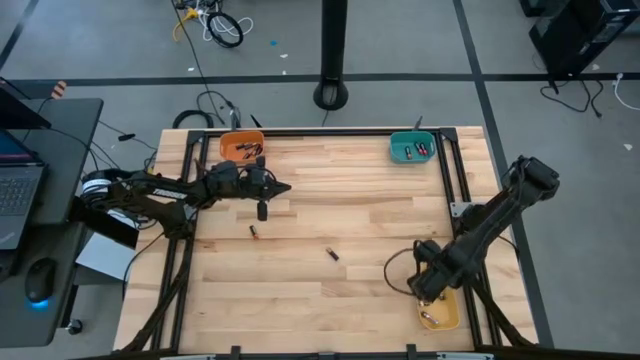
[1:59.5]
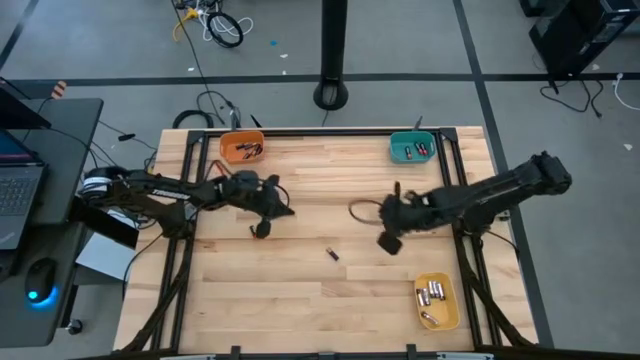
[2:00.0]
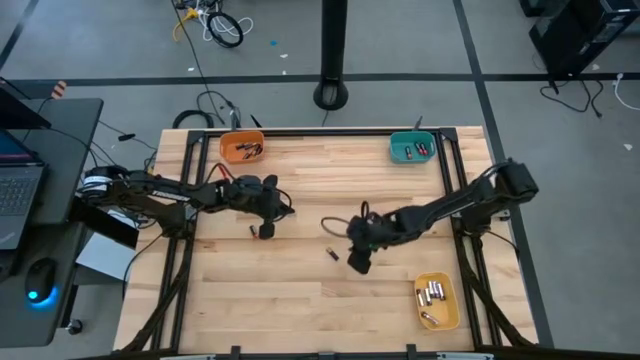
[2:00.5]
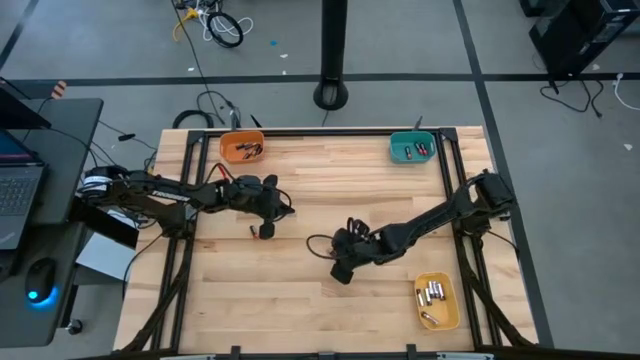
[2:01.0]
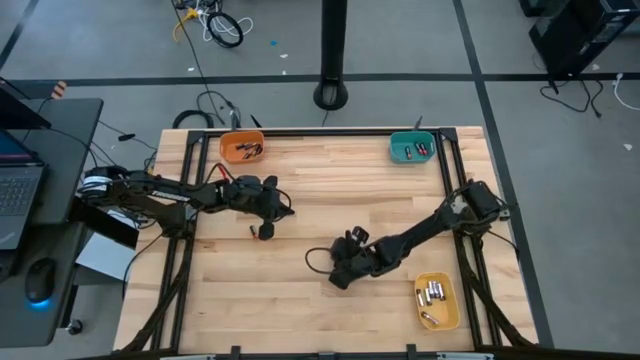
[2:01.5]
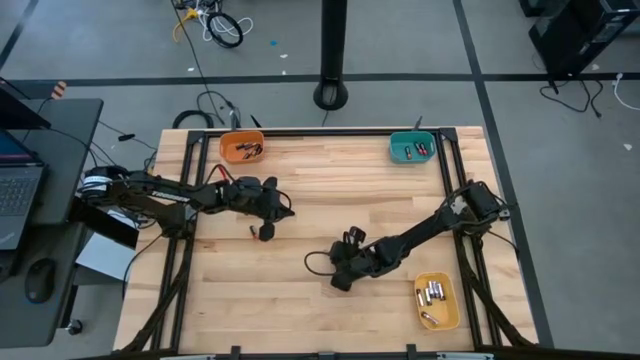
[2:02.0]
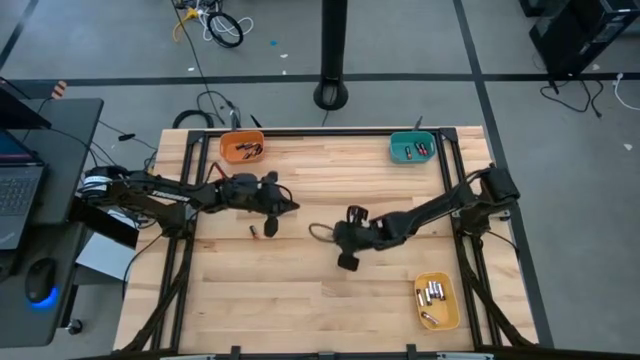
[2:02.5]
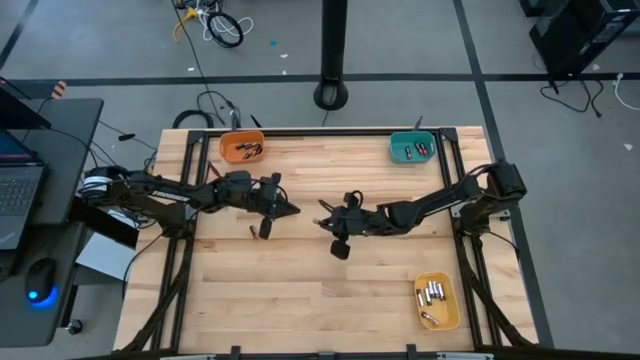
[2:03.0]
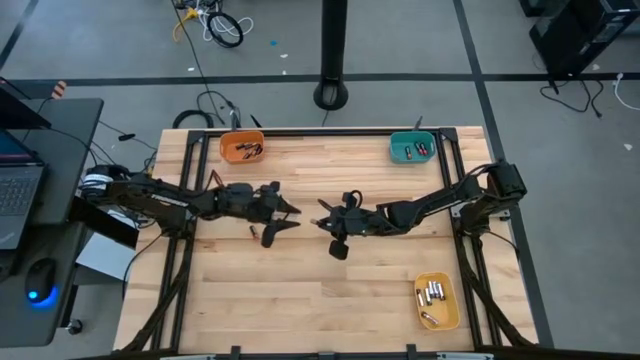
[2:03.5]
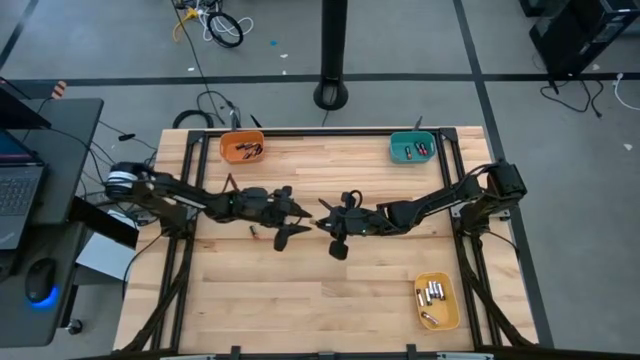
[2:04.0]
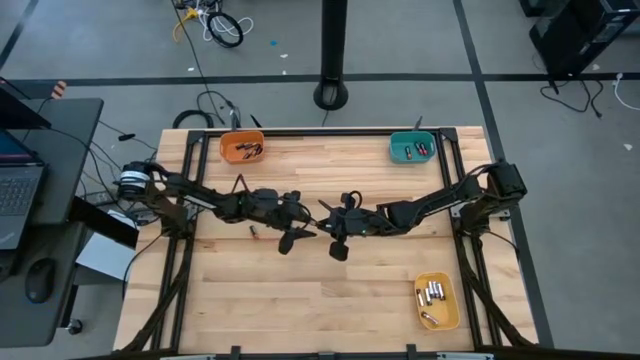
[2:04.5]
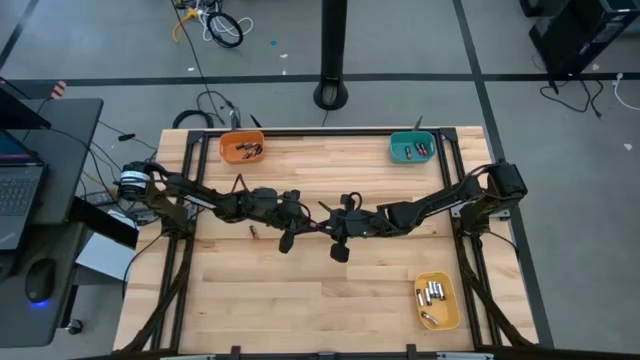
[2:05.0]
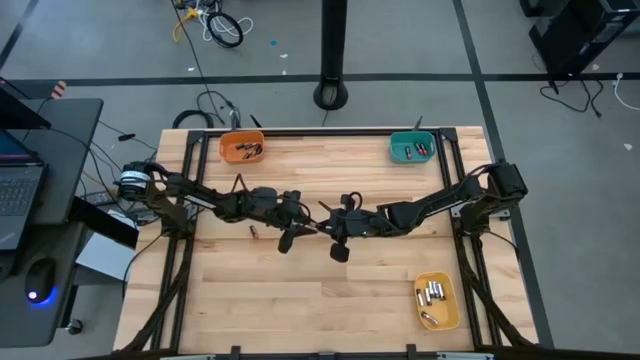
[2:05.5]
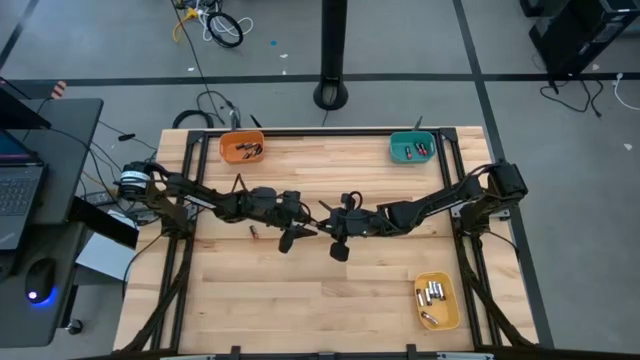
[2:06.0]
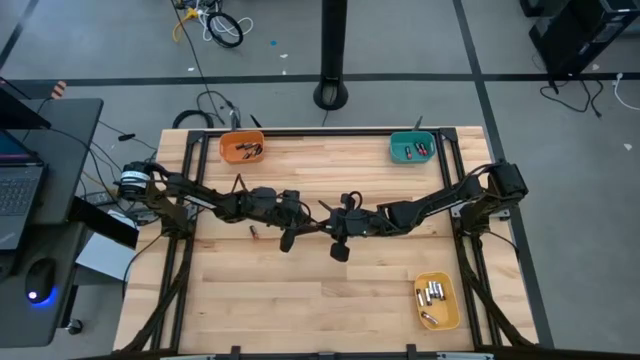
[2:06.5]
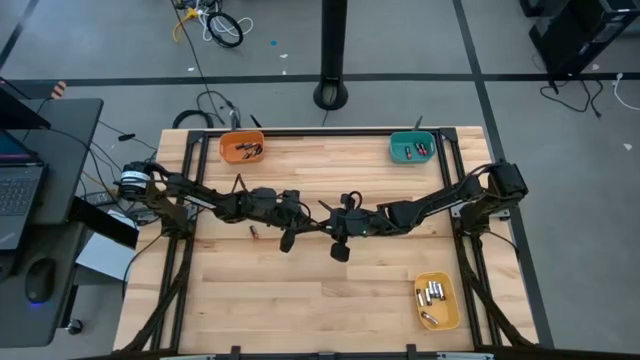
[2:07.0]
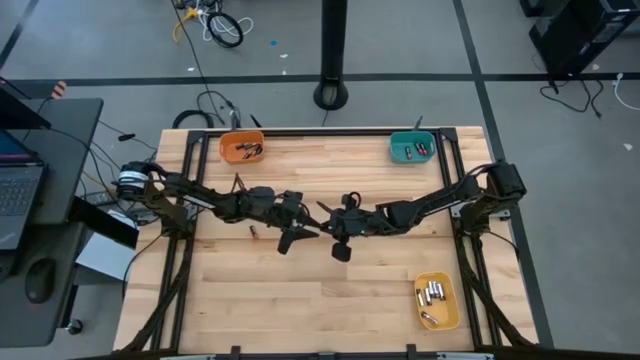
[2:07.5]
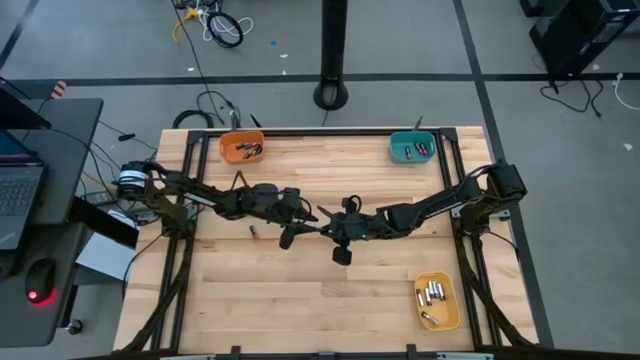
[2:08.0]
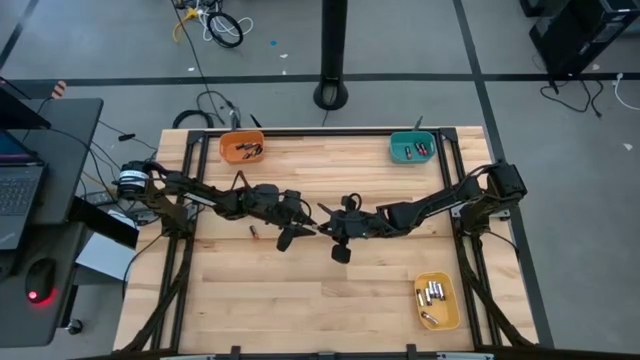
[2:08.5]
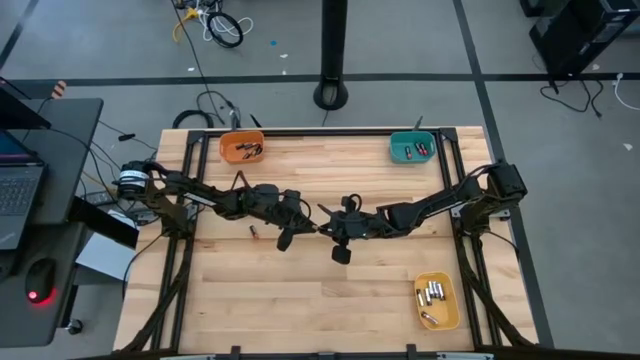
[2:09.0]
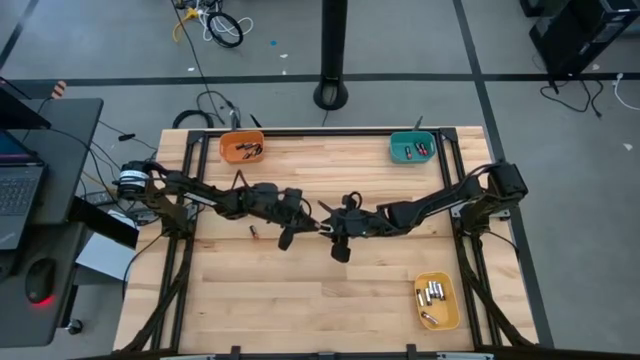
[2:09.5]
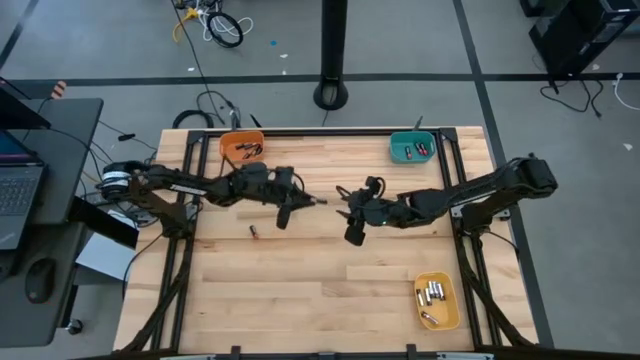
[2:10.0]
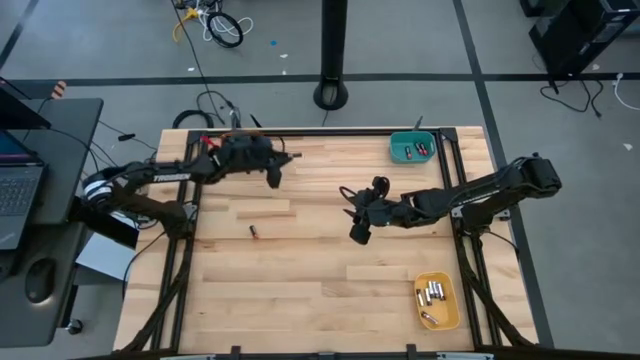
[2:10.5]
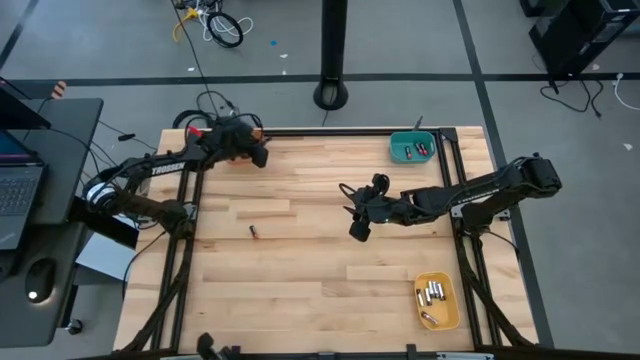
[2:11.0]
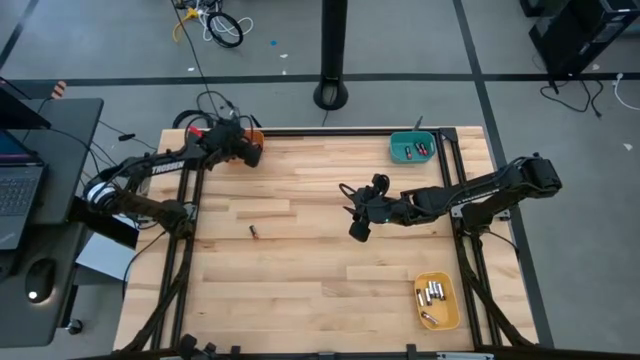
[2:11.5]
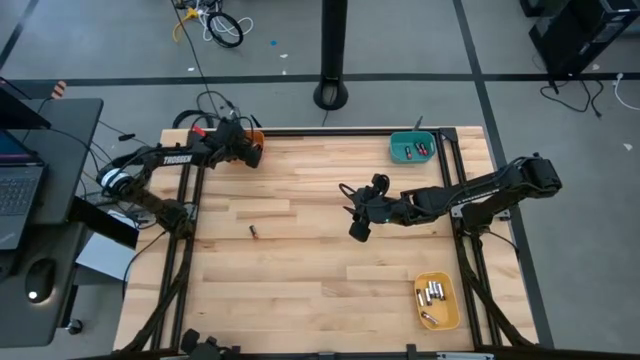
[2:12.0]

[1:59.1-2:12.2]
Task: Sort batteries
Put the black-orange battery into the orange bin

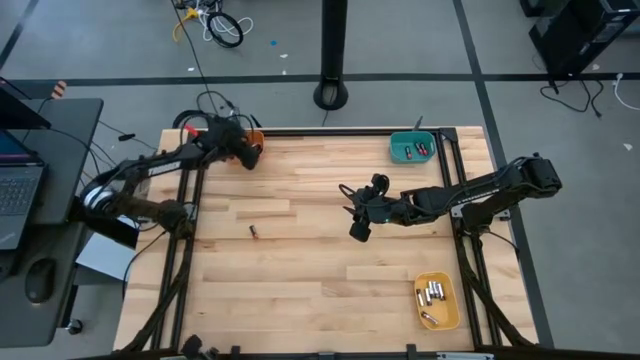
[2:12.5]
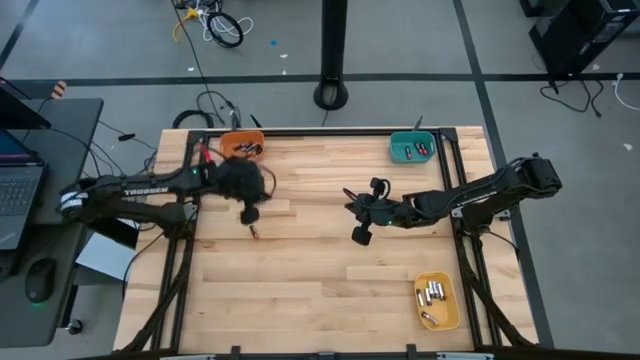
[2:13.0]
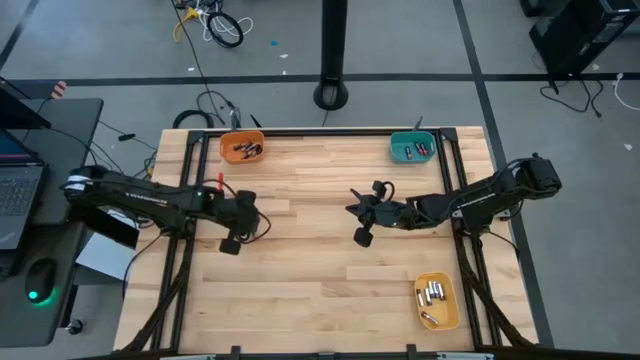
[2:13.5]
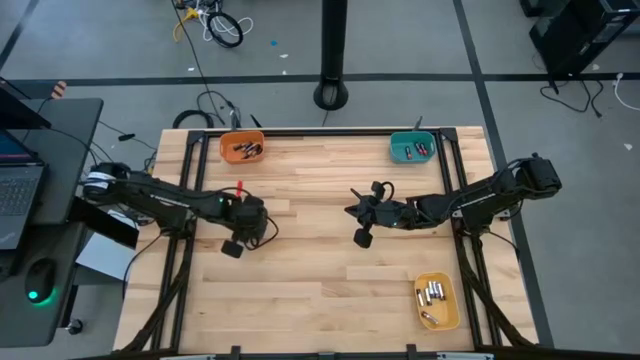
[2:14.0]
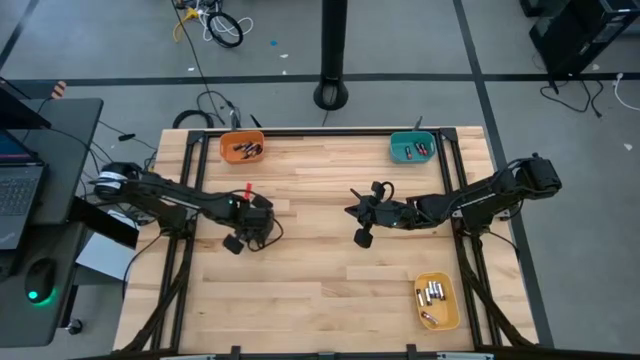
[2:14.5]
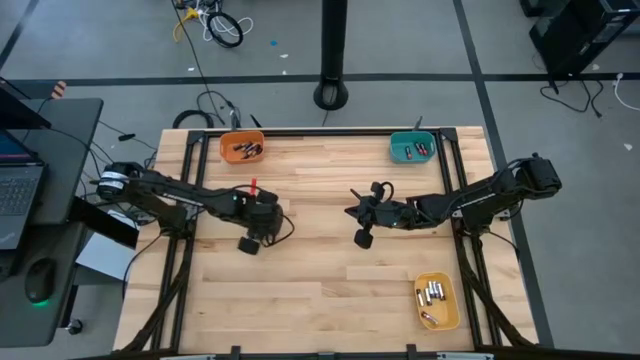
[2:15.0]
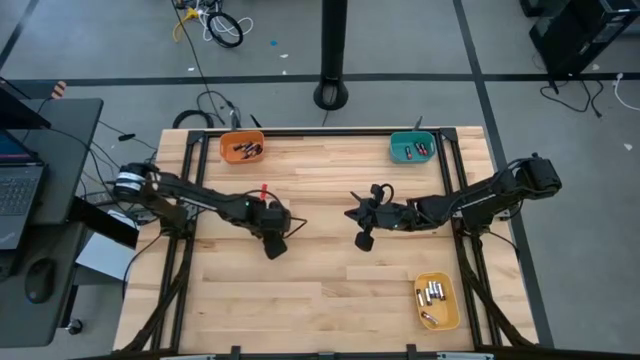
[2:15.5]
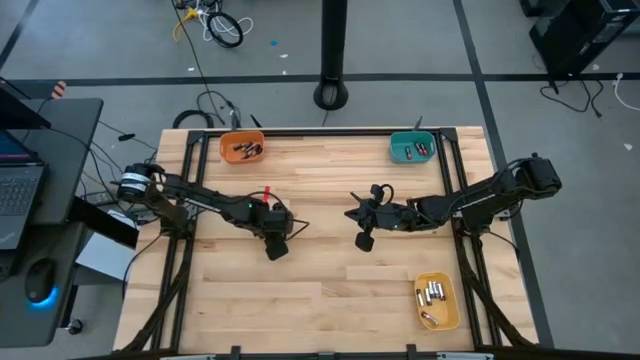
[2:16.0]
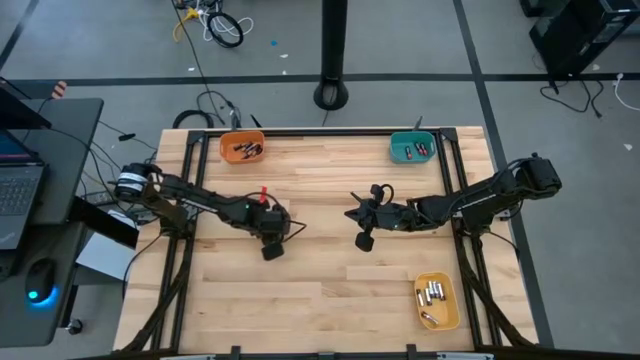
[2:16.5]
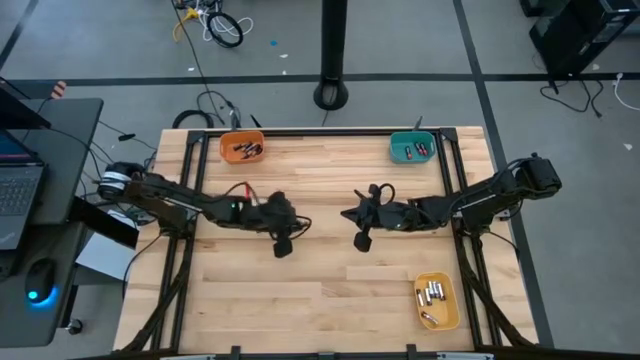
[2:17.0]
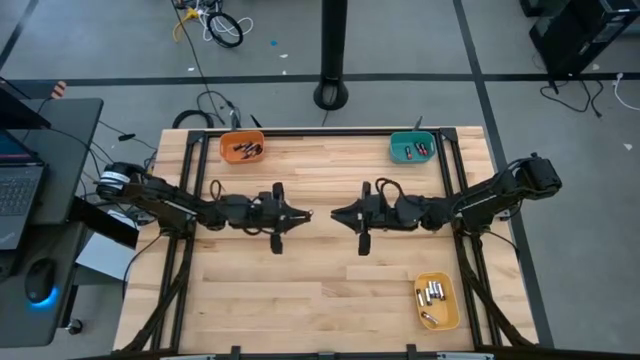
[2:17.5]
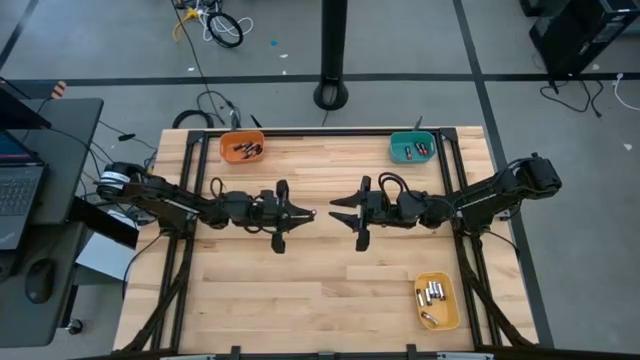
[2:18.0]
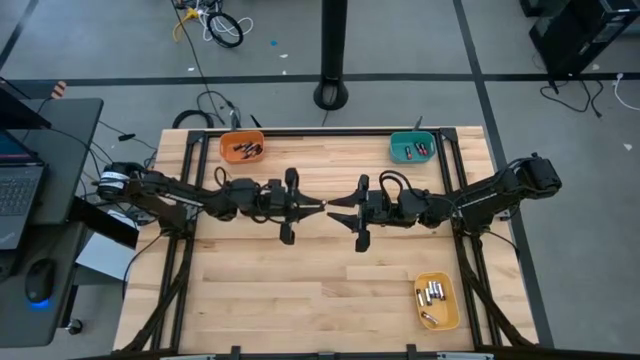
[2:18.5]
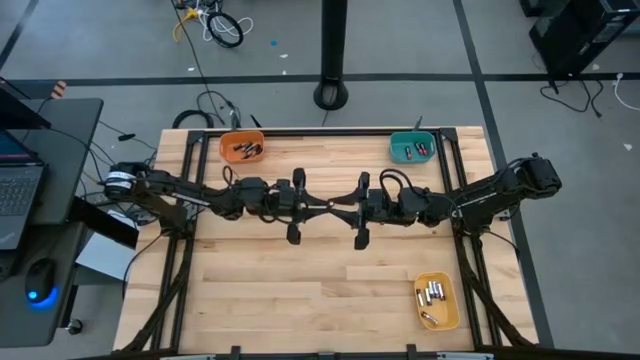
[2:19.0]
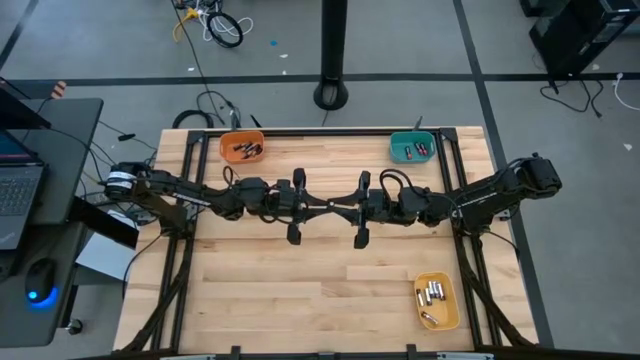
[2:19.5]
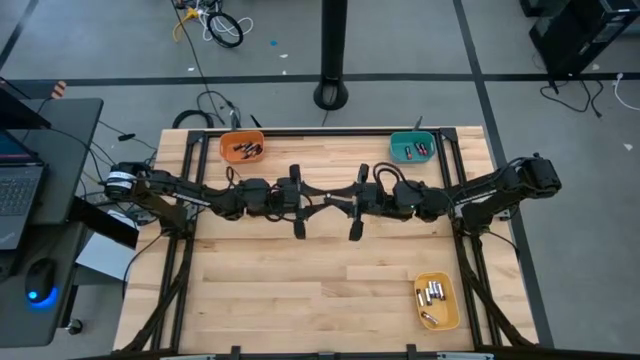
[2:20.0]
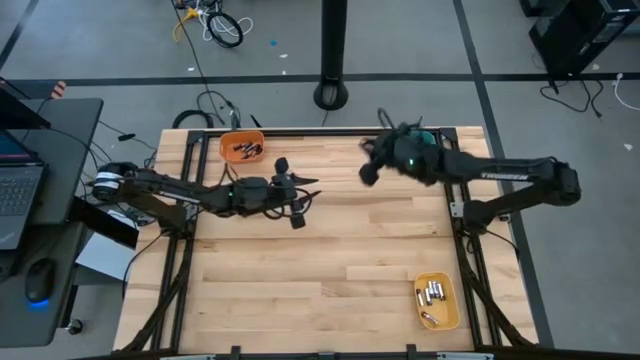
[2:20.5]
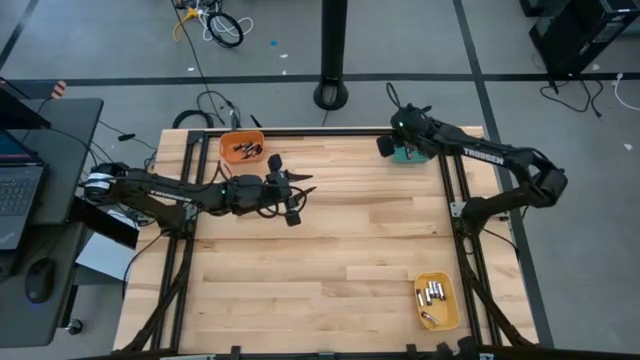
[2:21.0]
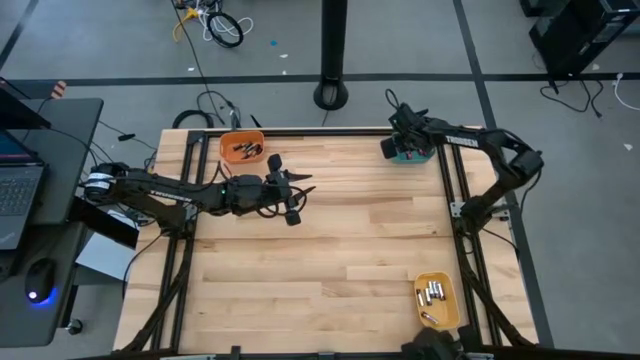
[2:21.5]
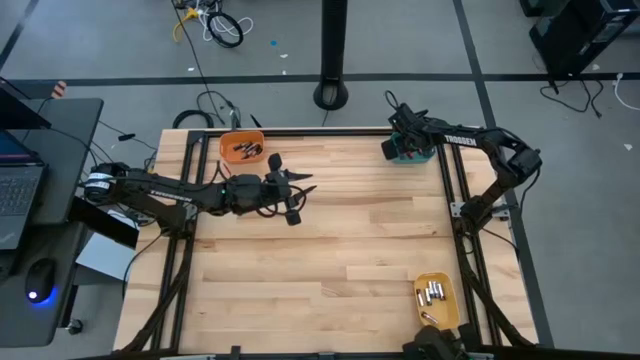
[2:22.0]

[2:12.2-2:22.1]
Put the black-red battery into the blue bin
